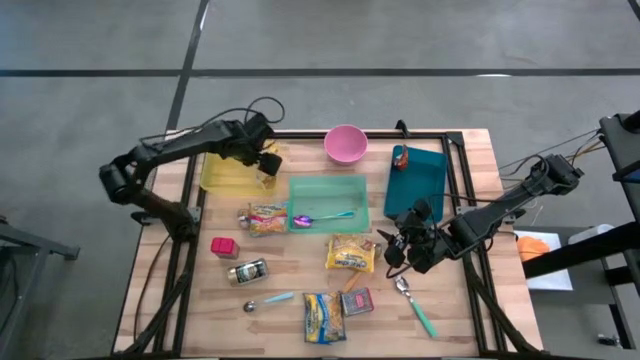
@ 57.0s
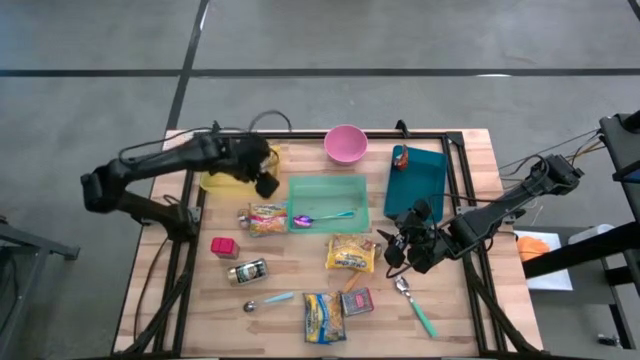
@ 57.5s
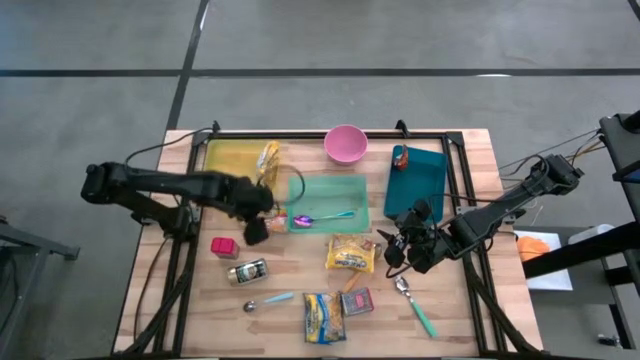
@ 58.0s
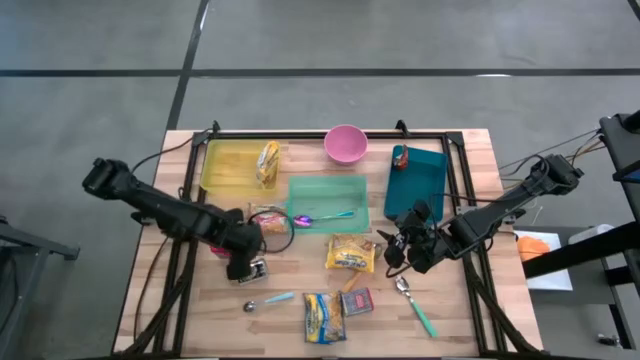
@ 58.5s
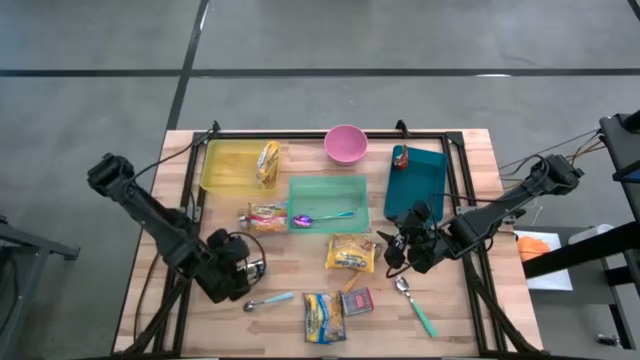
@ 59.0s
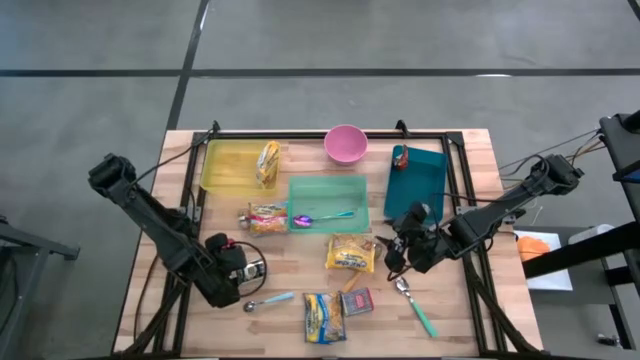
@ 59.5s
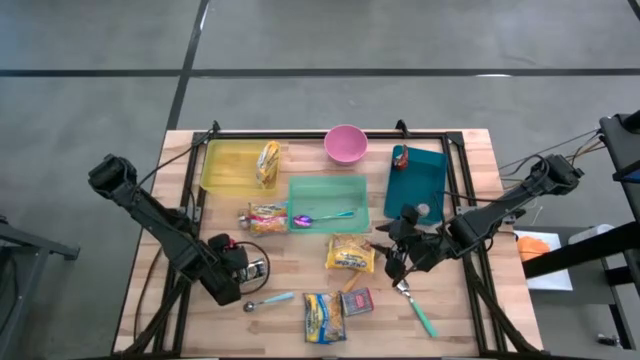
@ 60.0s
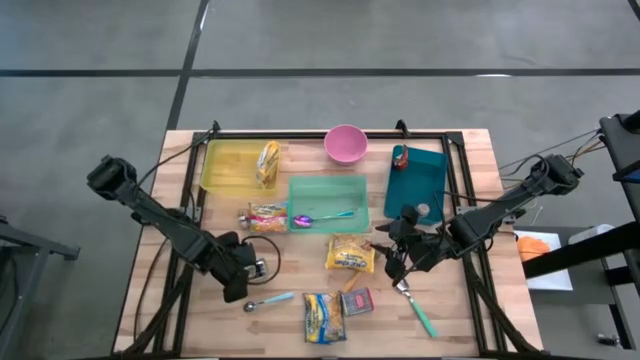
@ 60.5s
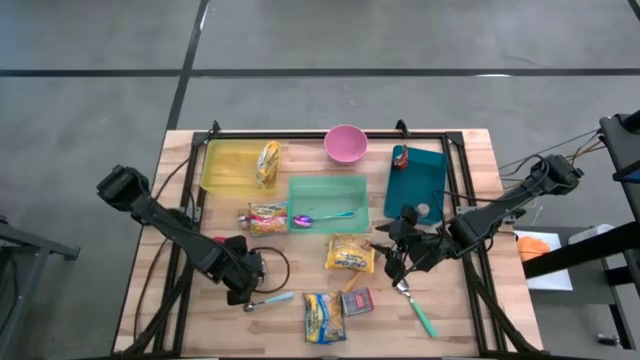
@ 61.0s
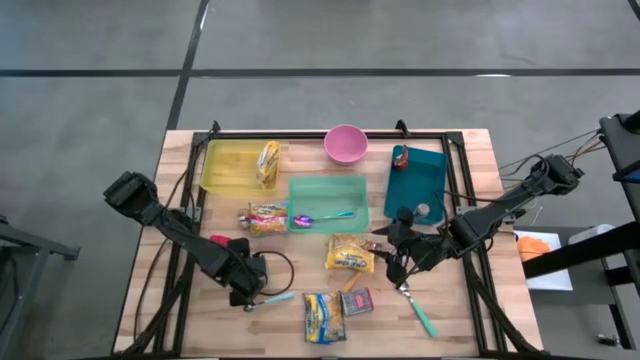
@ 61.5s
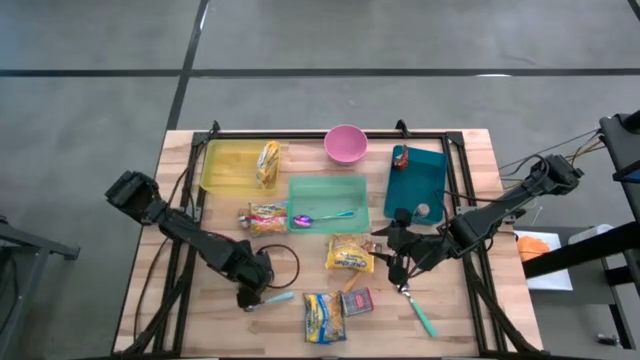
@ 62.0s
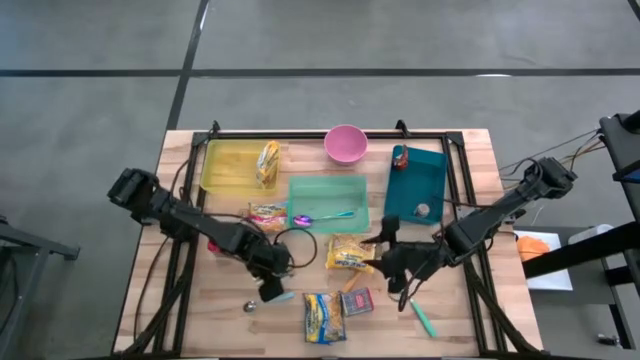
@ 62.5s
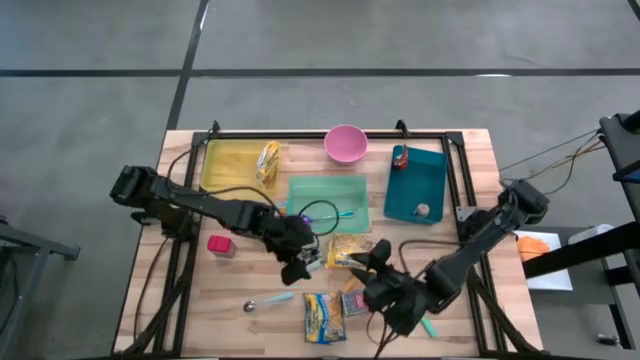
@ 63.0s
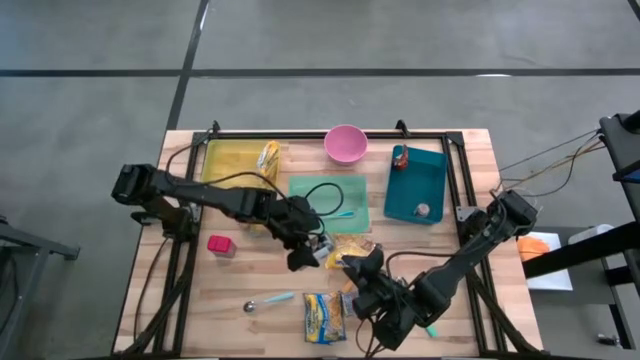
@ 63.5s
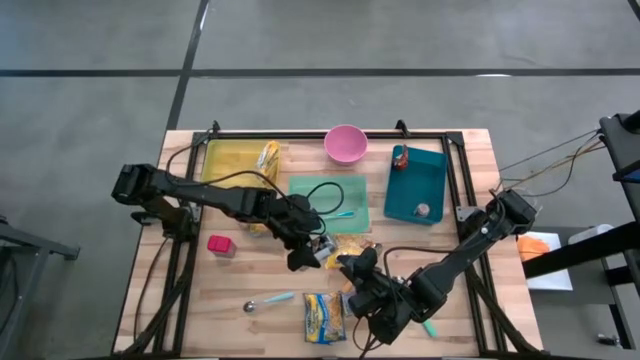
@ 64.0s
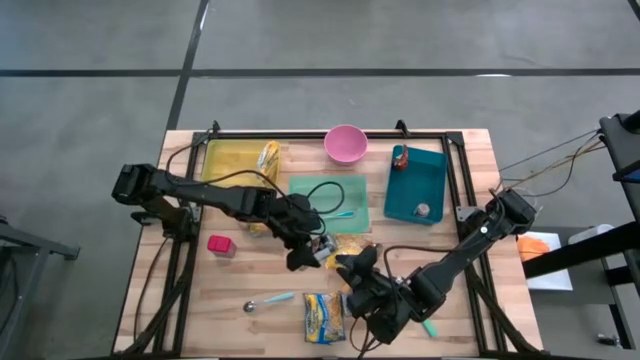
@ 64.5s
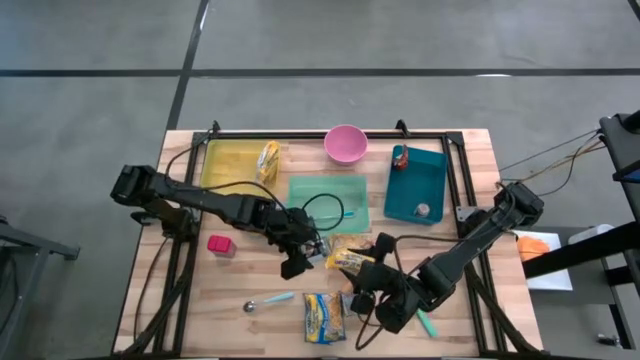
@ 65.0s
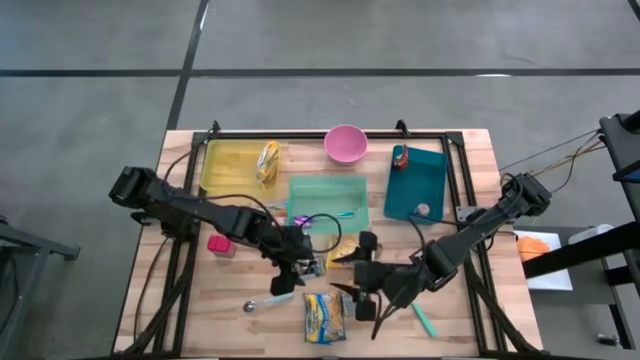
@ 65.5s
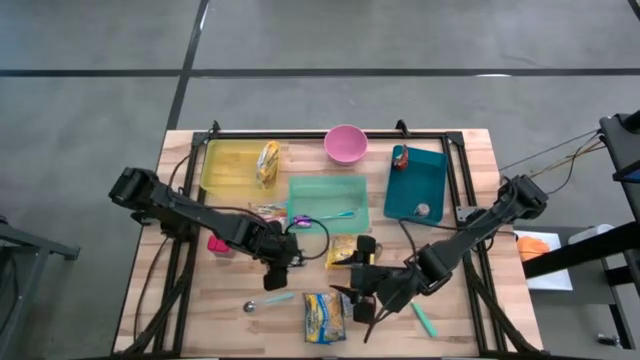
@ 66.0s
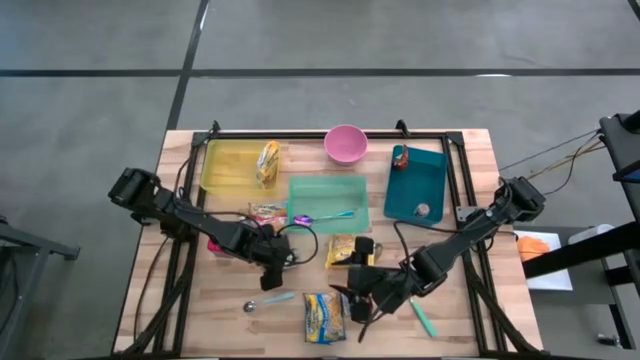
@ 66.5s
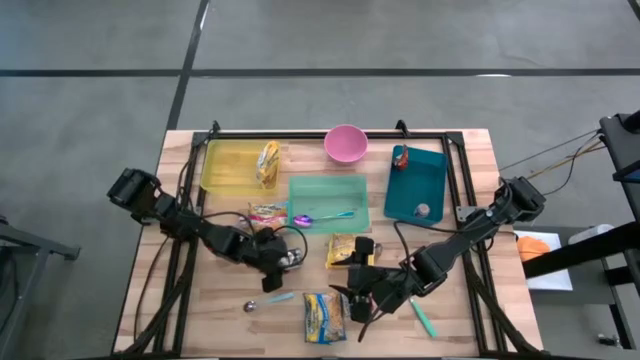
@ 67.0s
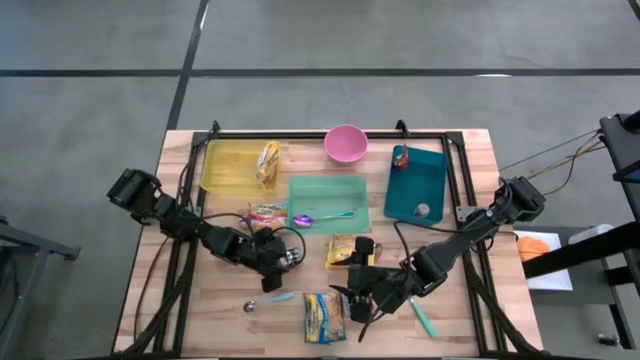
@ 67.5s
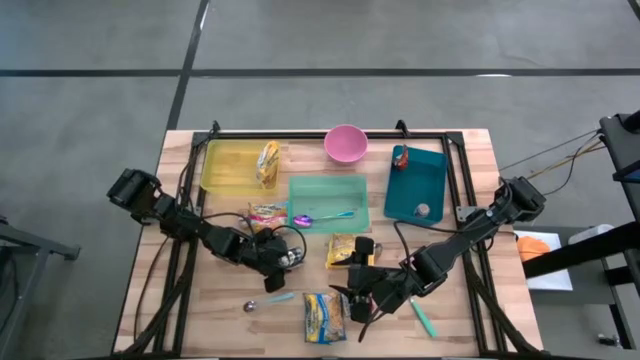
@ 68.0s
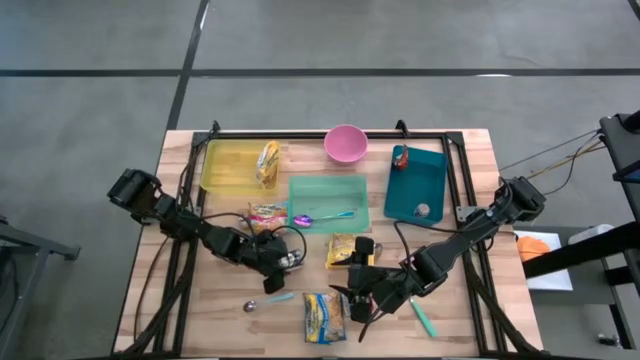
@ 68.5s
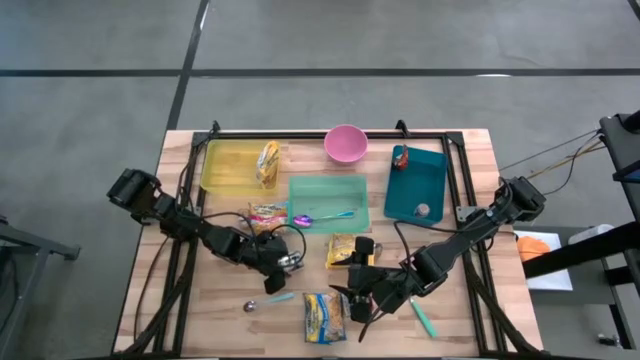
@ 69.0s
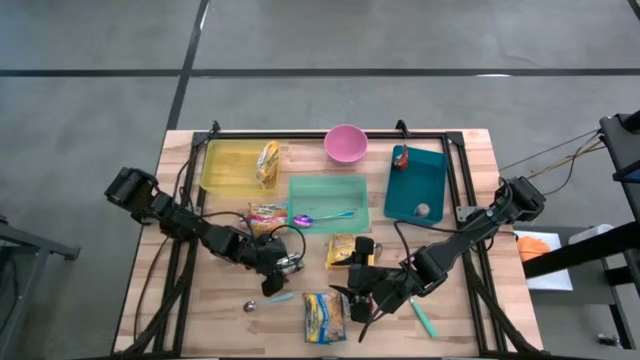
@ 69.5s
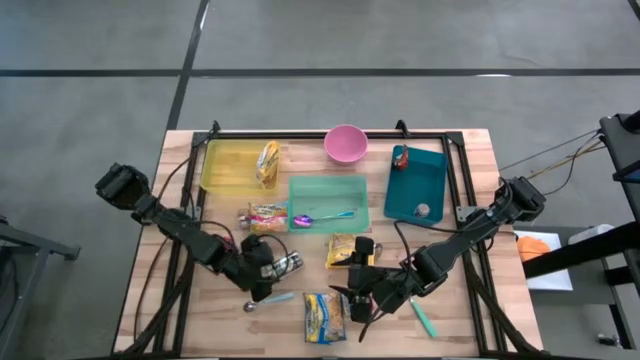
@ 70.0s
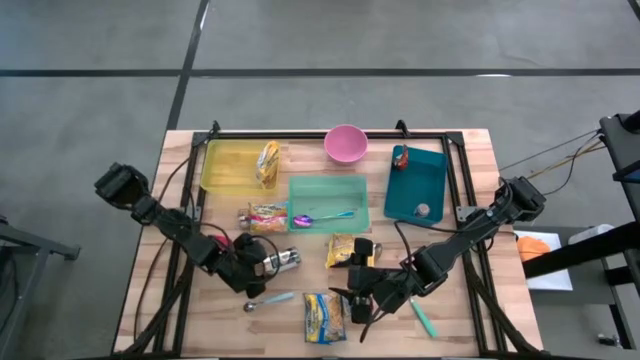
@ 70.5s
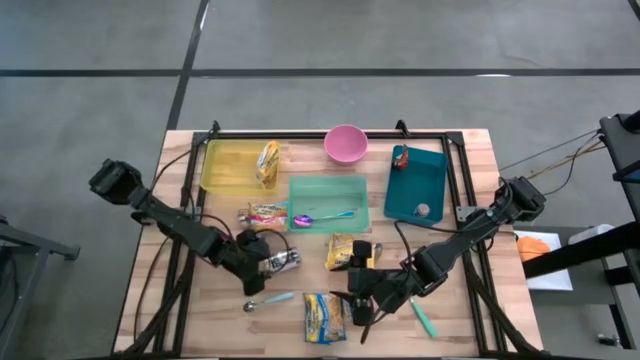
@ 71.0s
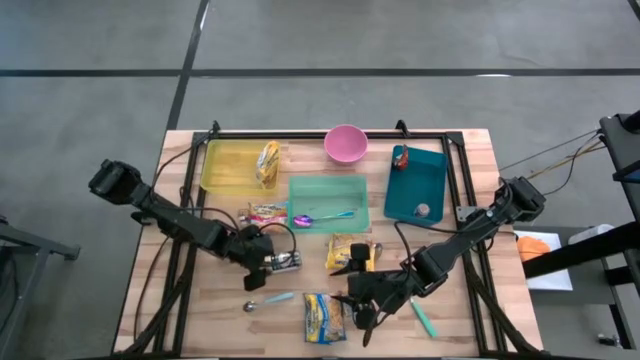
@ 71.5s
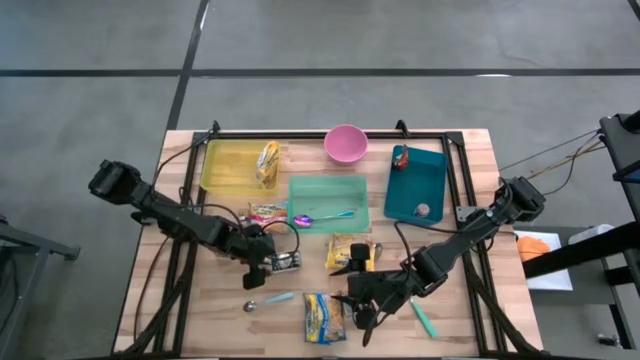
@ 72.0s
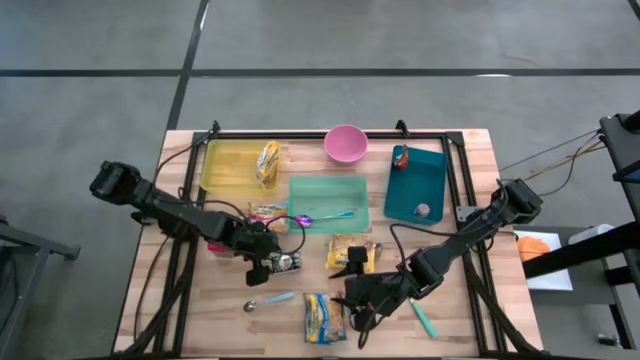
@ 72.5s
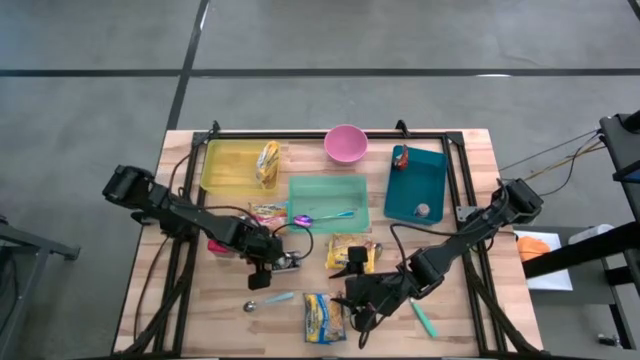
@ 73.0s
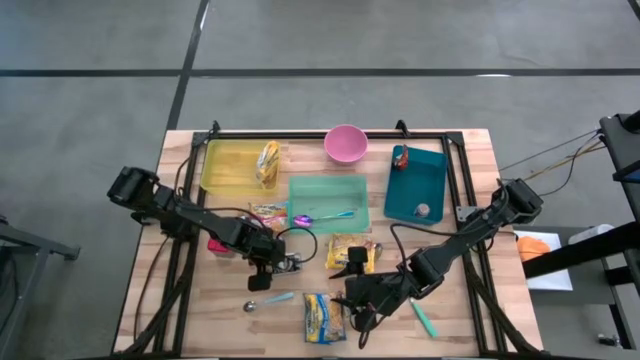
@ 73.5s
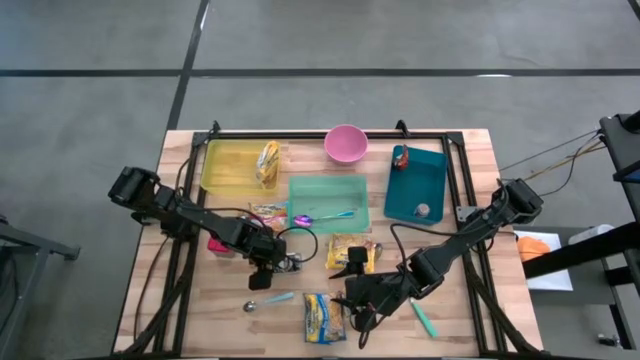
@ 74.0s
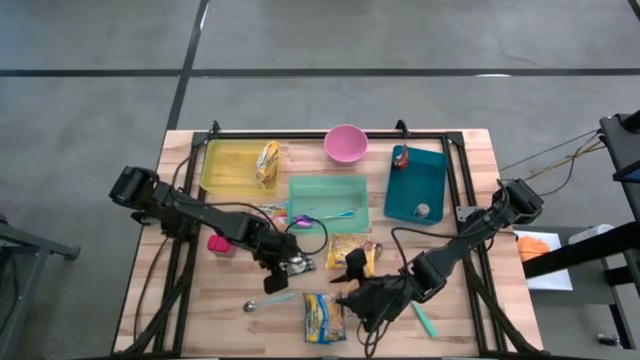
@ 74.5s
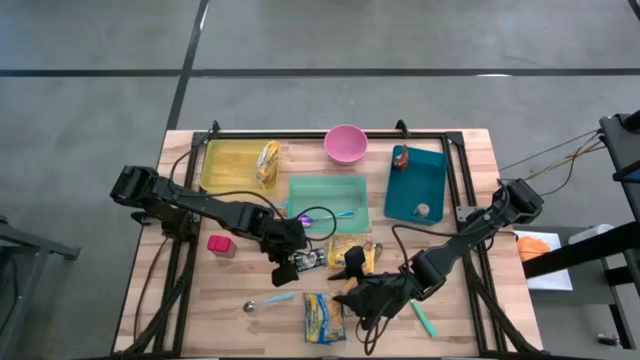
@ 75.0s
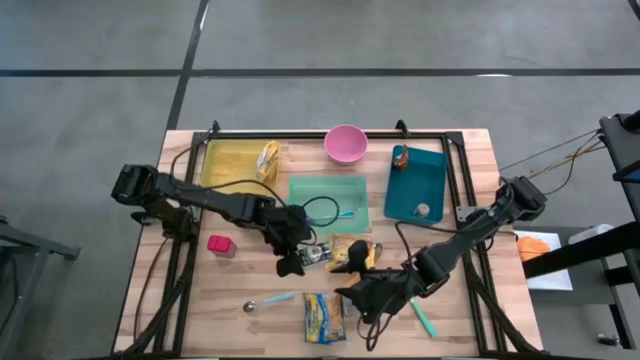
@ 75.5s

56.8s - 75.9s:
Put the gold seasoning bottle into the blue bin
